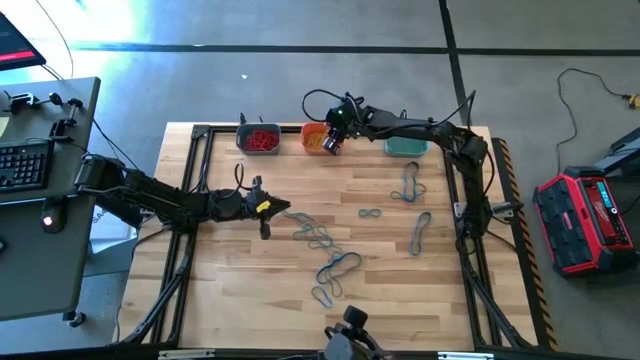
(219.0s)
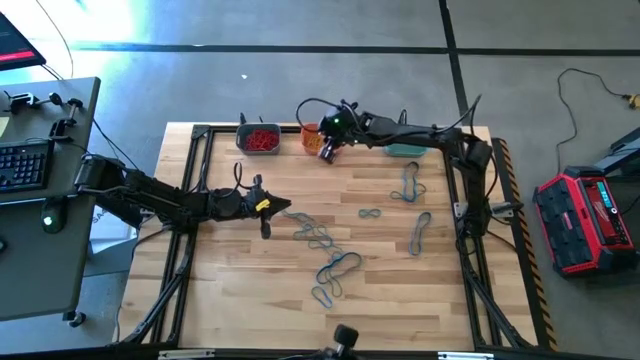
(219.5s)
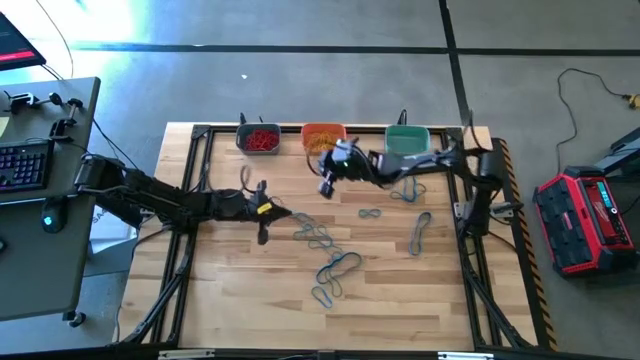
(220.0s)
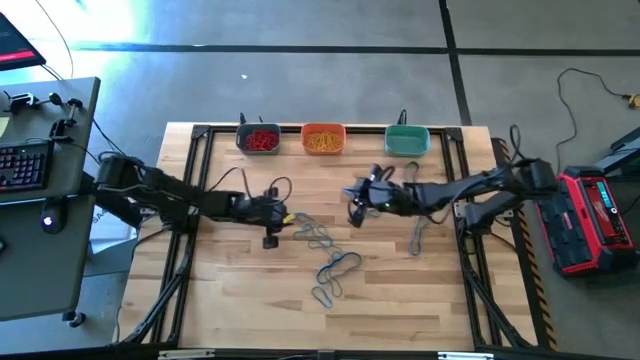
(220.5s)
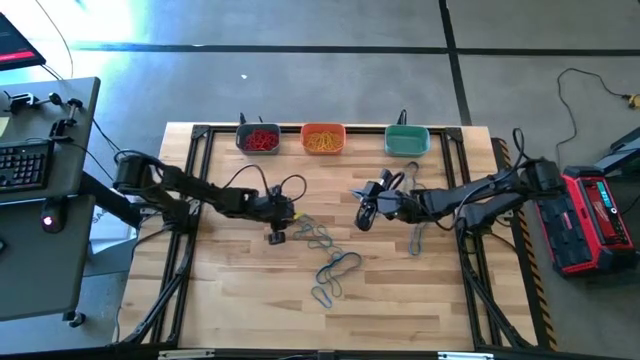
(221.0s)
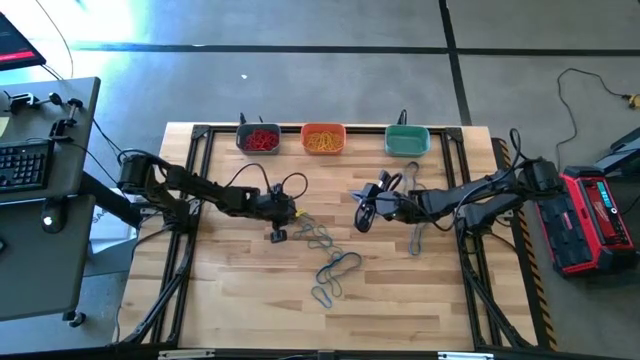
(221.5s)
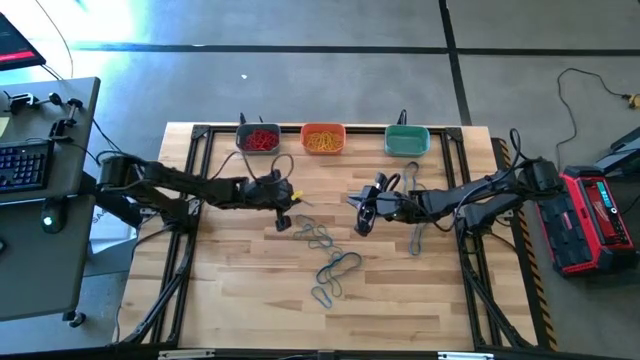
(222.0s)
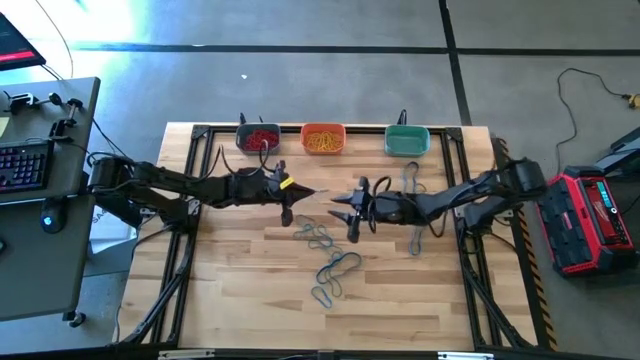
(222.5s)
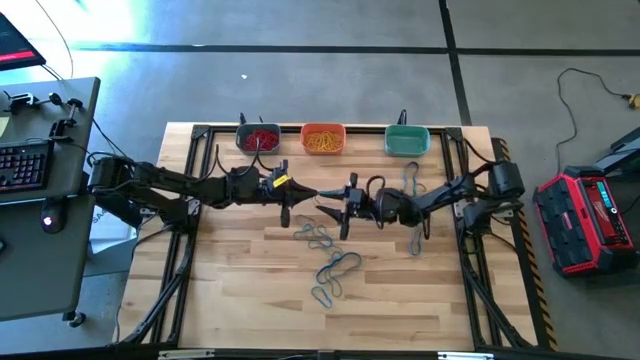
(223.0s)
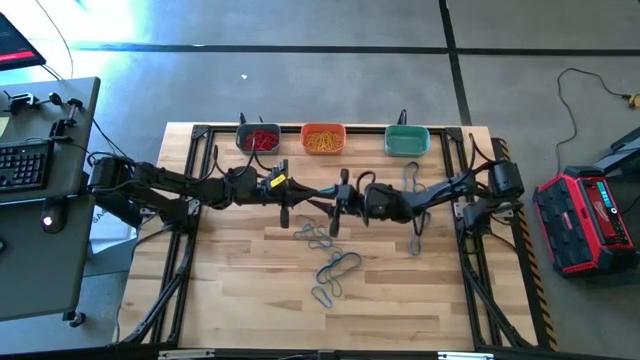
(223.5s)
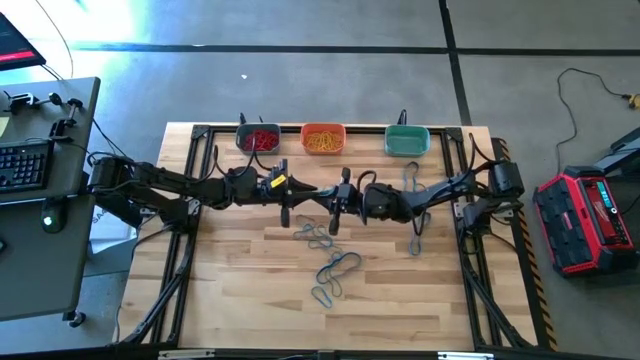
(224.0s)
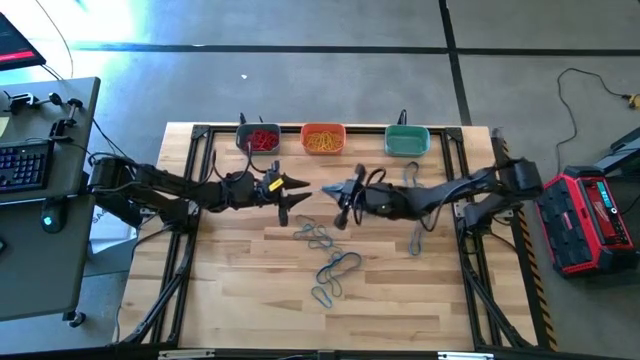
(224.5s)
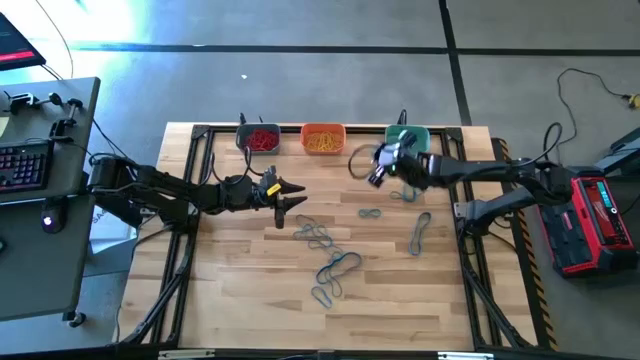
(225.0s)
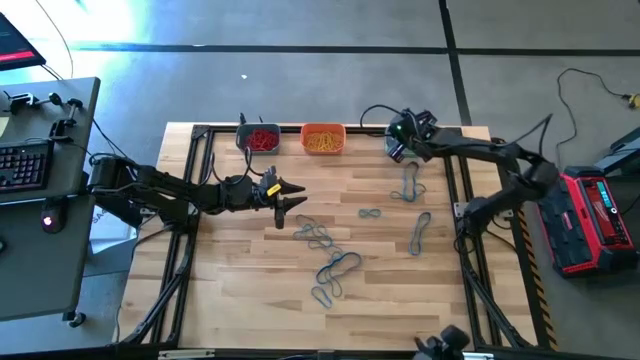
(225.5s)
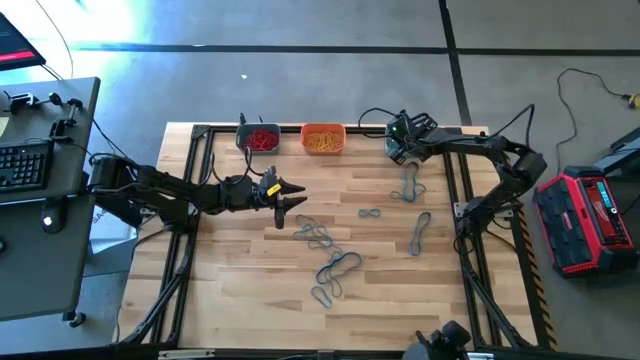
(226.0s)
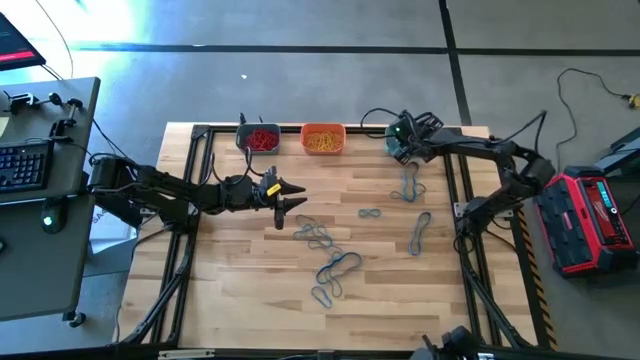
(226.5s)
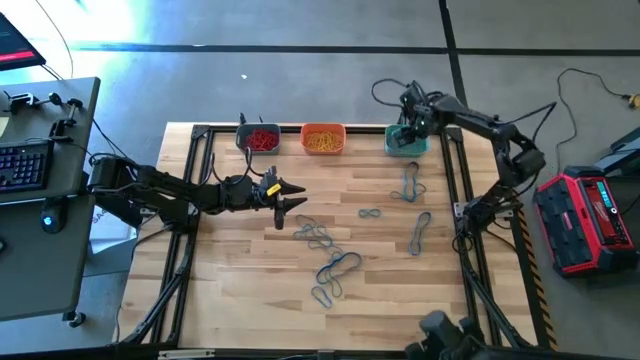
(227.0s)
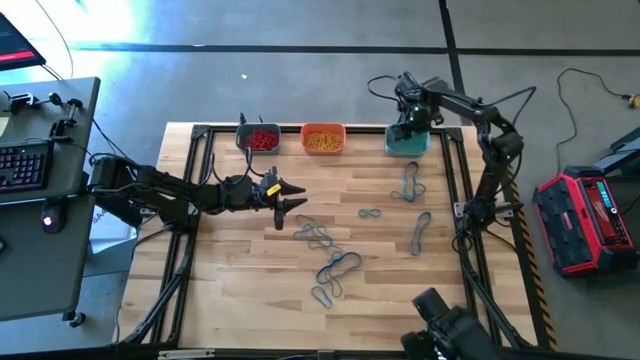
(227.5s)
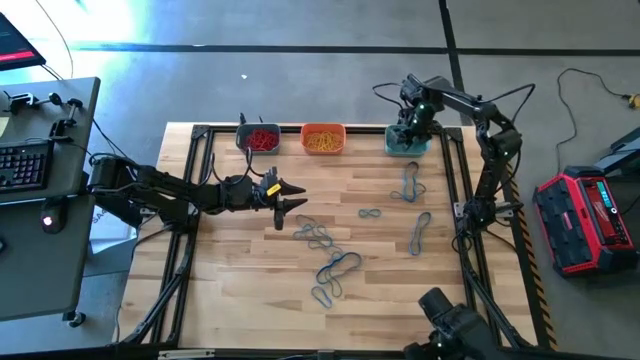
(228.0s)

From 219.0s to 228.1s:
Task: Sort rubber bands into baskets
Put the blue rubber band into the light blue bin

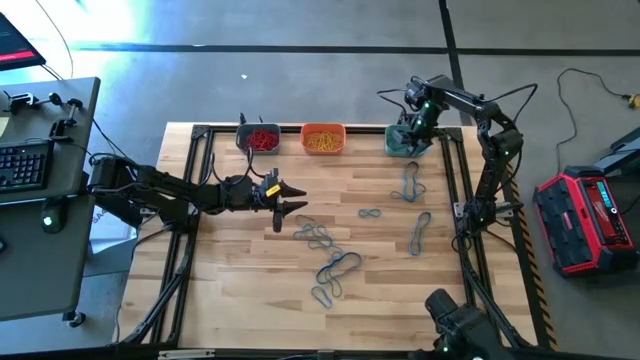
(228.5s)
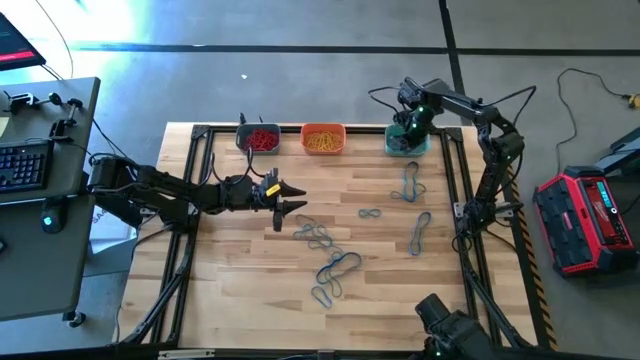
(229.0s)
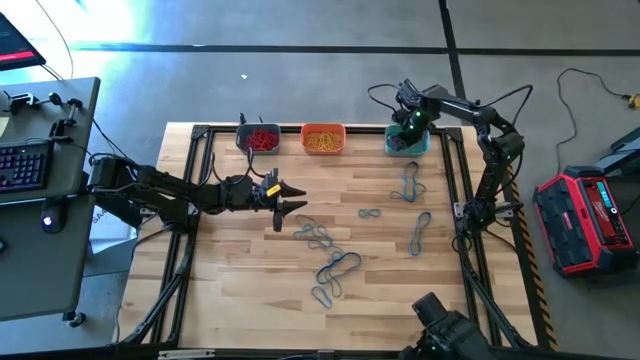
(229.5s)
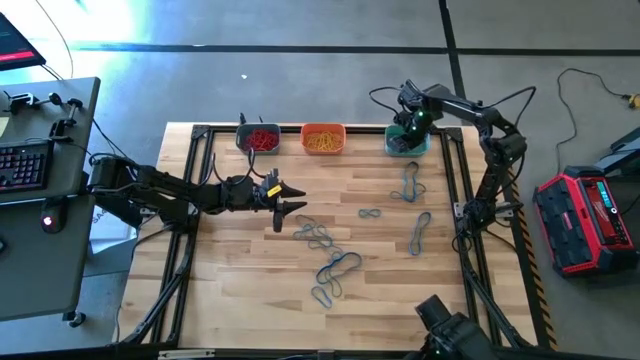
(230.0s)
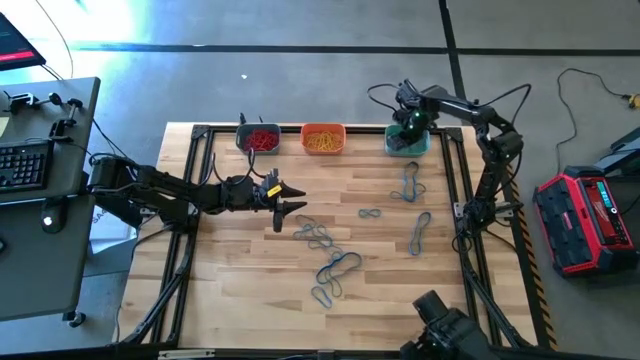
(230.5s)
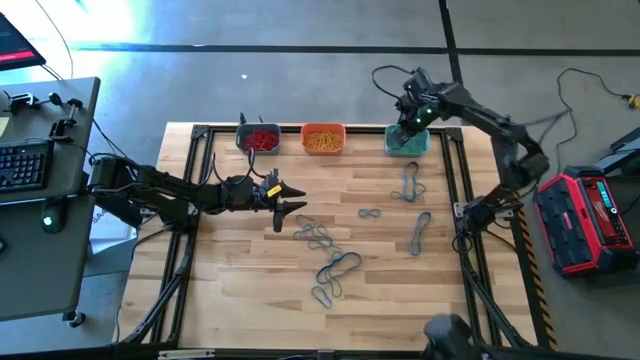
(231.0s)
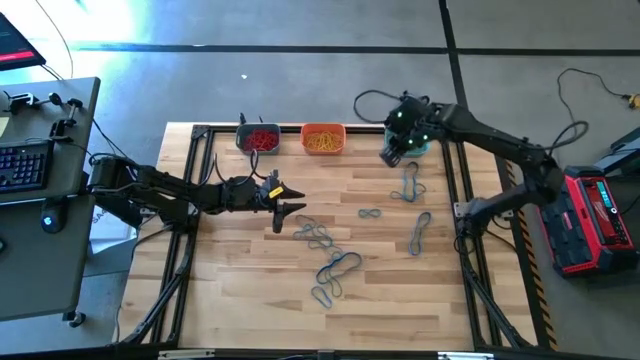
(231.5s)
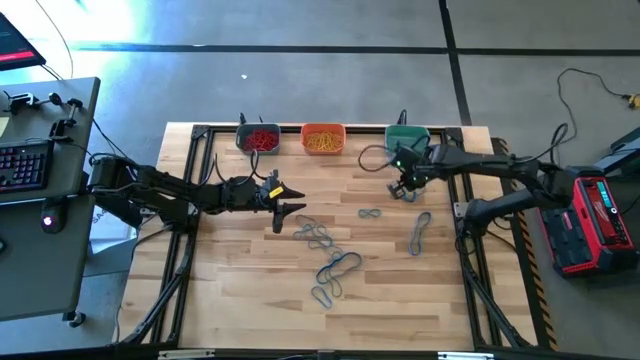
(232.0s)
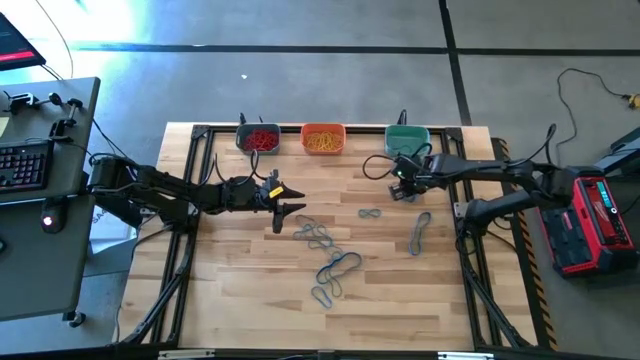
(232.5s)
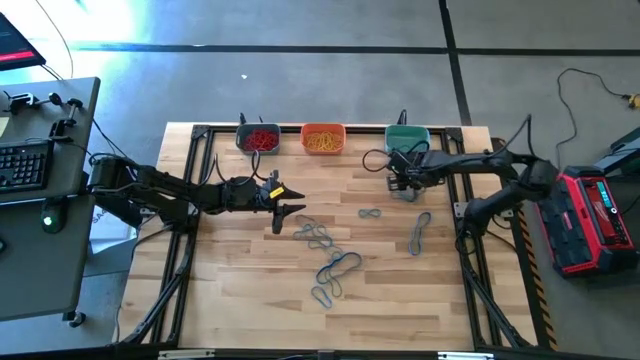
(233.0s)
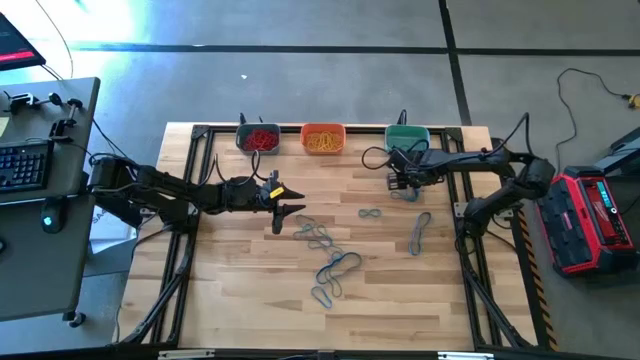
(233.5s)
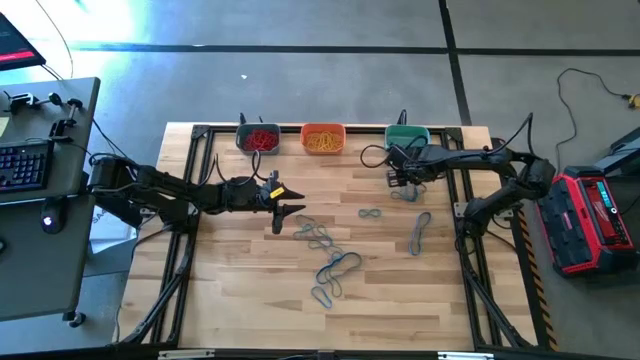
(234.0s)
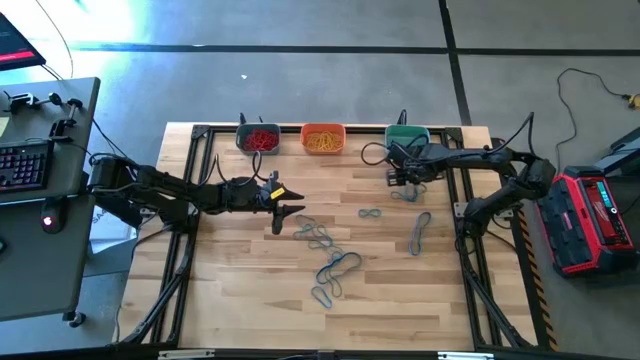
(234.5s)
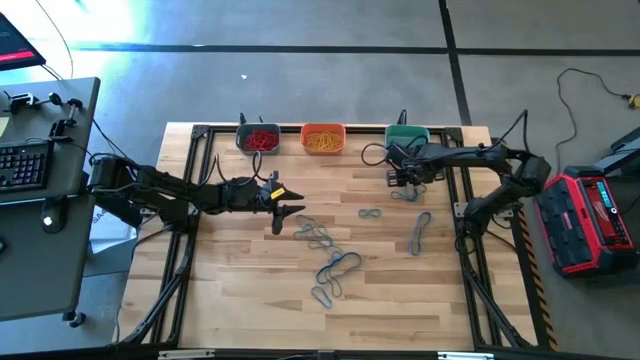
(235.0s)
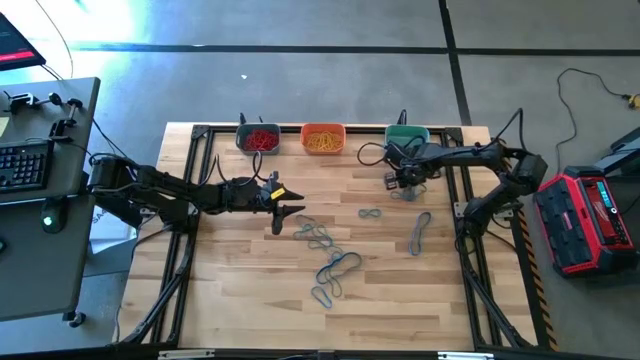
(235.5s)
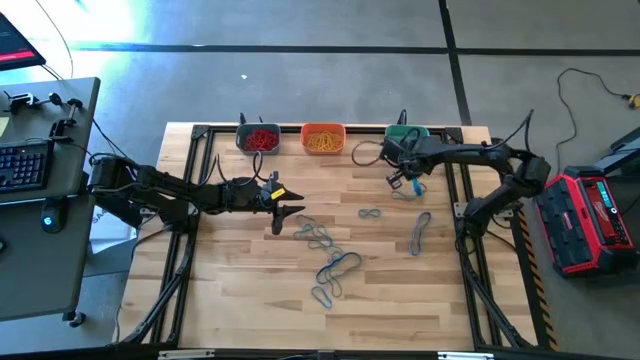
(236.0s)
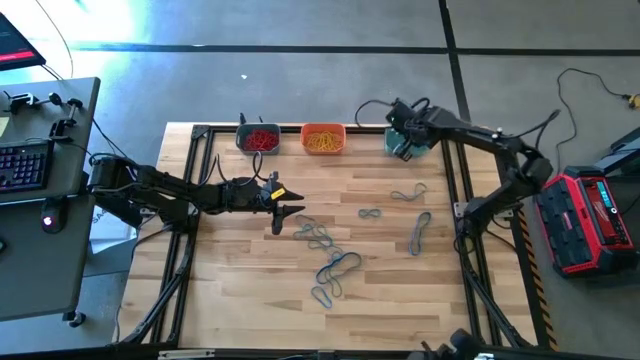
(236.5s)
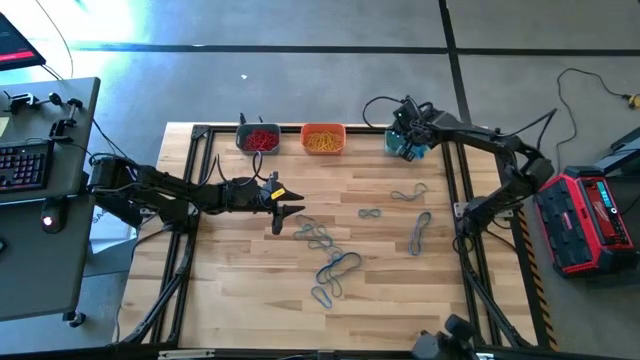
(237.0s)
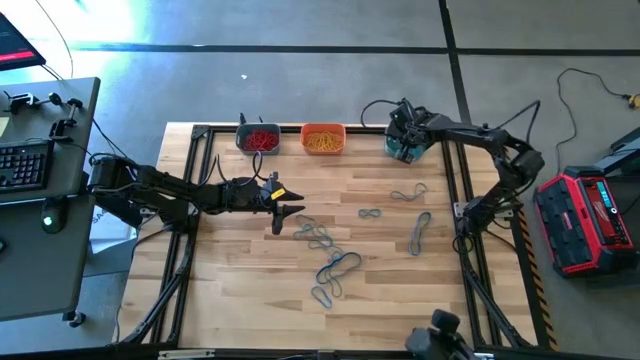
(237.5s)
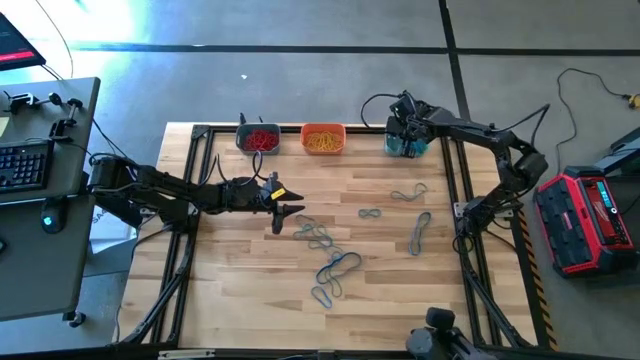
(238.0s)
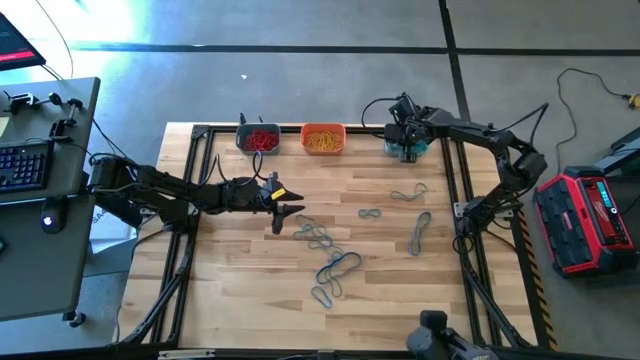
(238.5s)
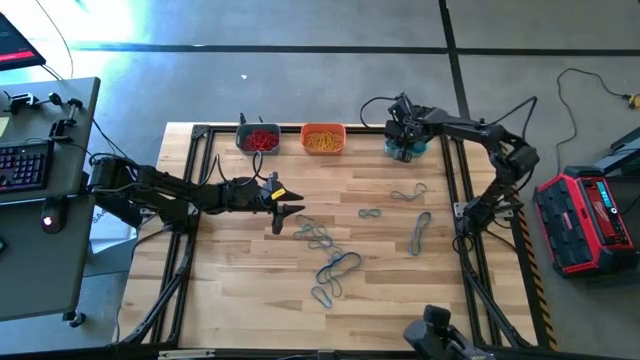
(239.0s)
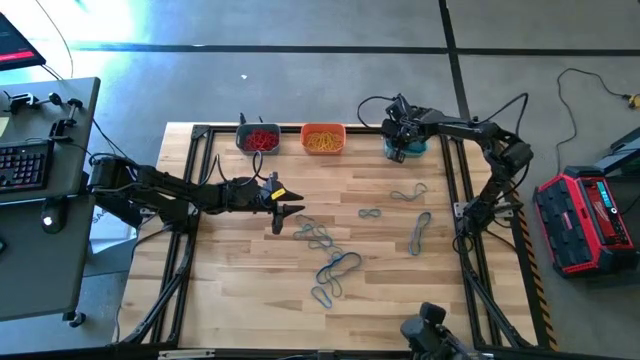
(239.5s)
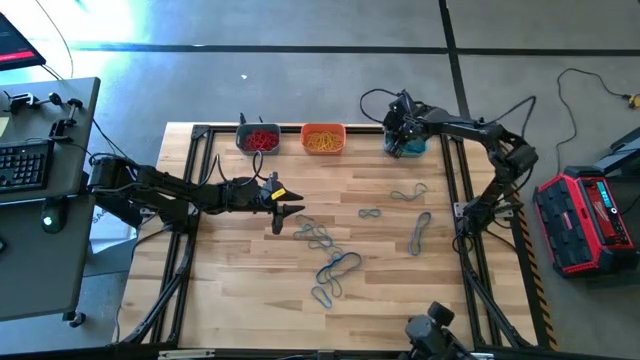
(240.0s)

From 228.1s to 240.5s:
Put the blue rubber band into the light blue bin
